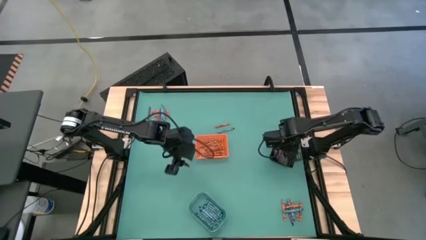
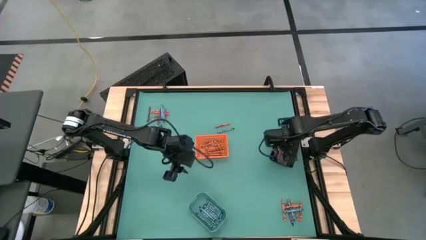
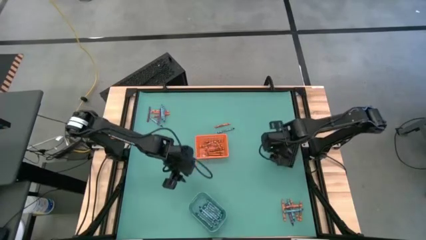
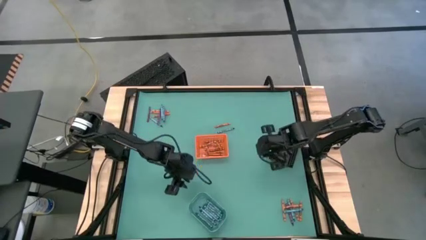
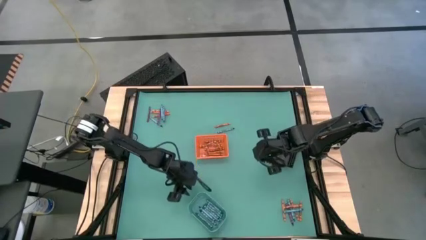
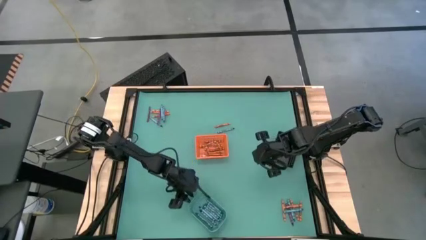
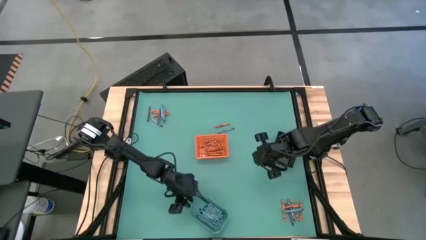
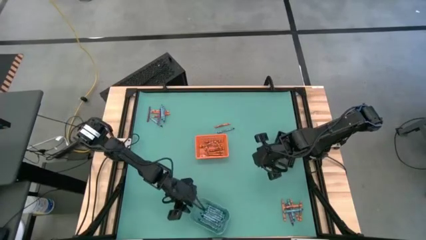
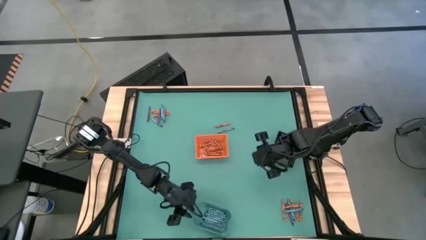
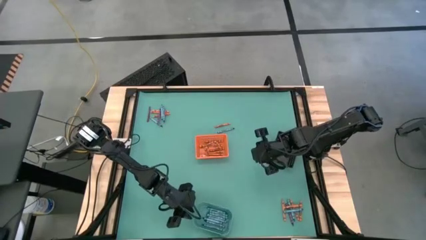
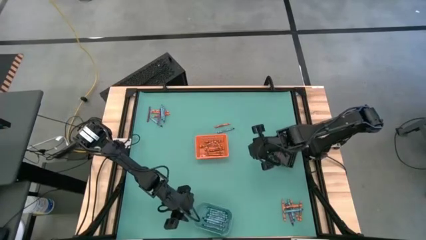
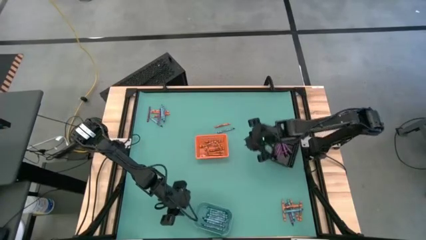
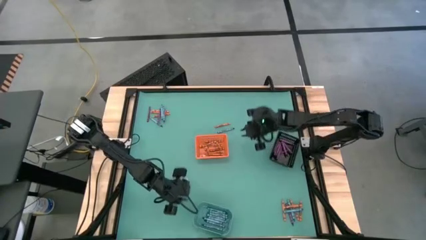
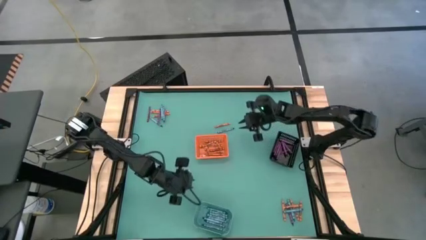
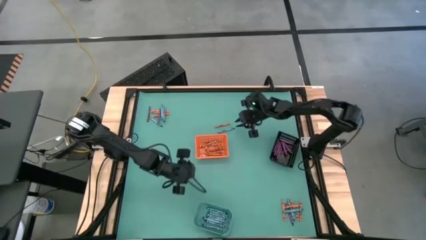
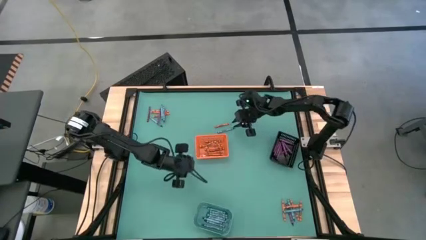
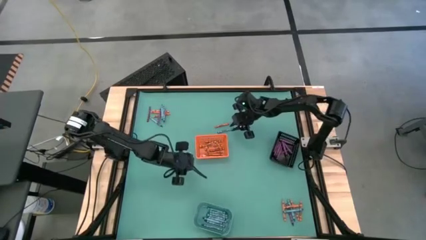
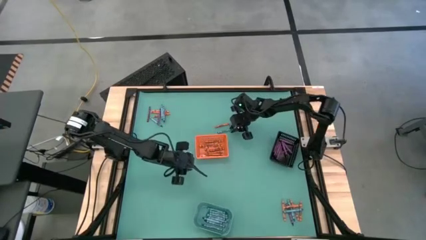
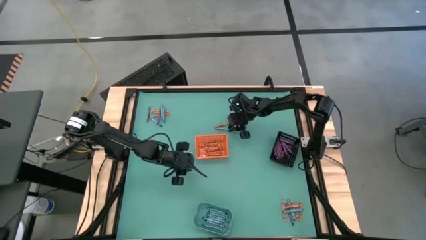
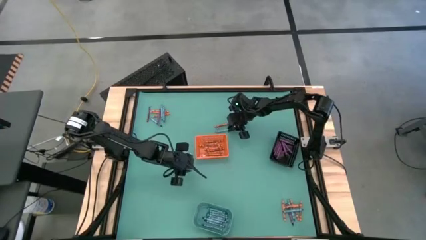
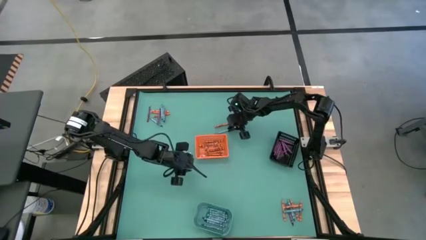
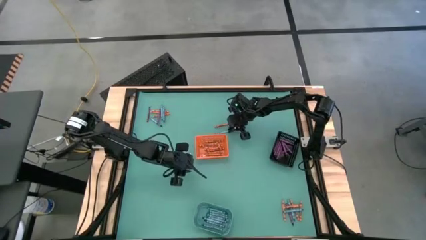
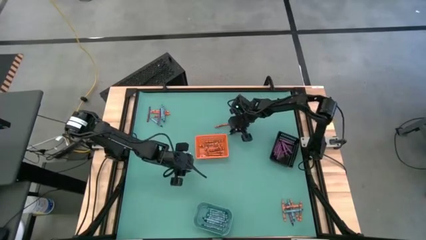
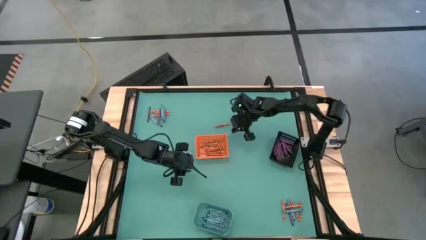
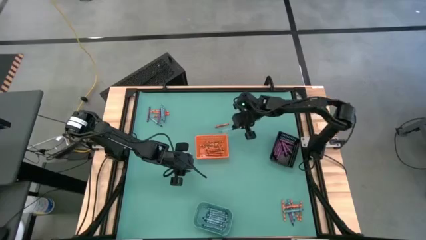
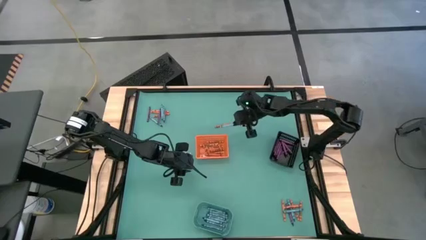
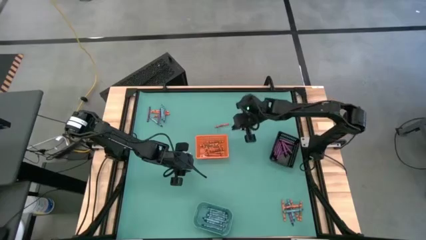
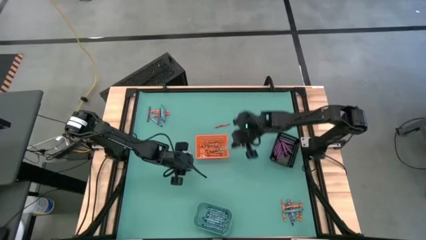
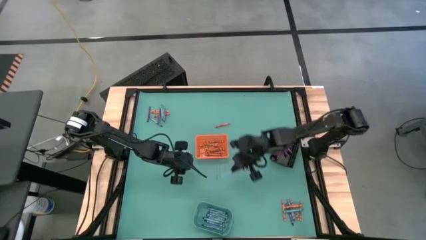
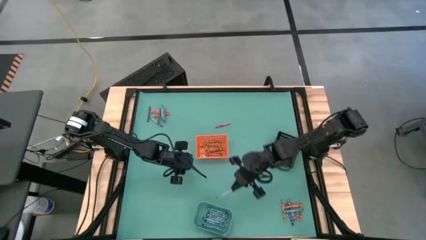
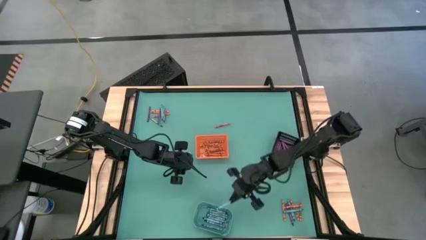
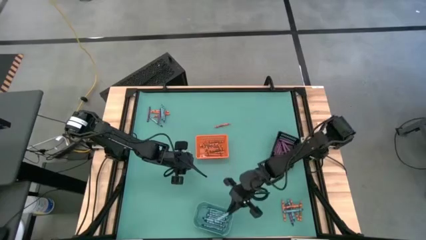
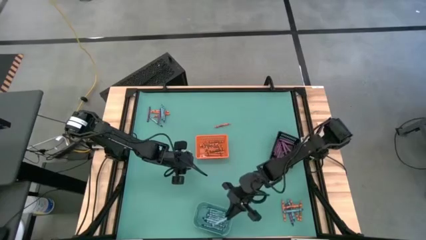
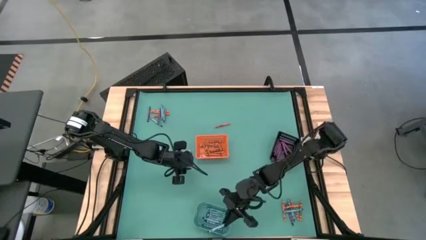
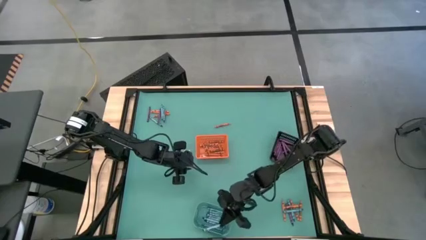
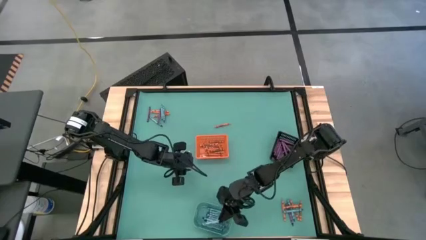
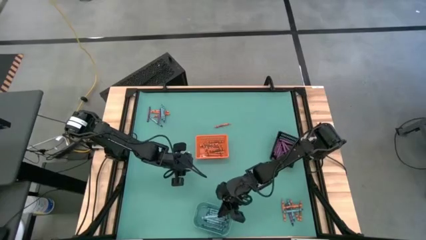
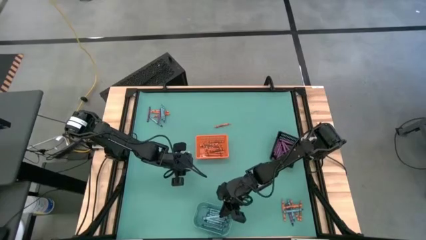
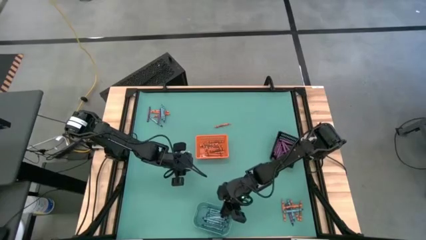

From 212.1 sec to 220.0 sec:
Task: Sort crayons
Put the blue crayon into the blue bin

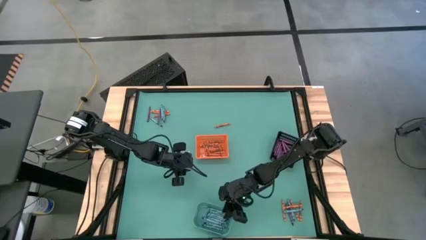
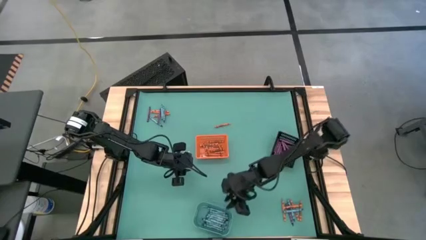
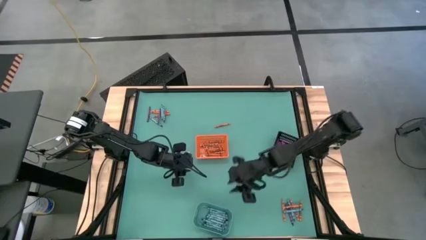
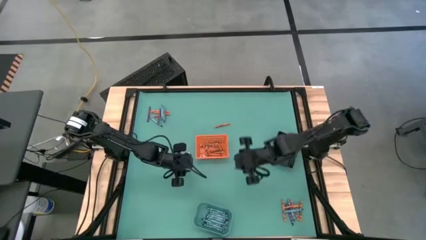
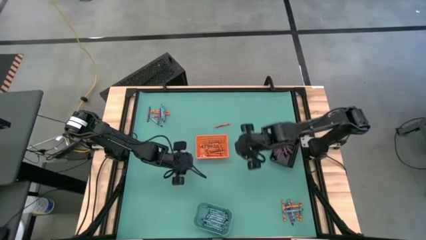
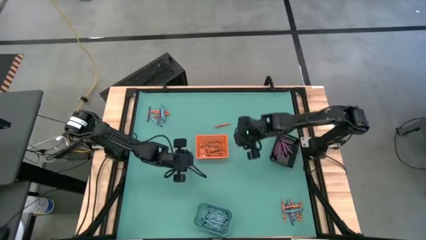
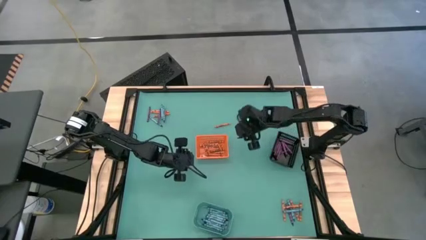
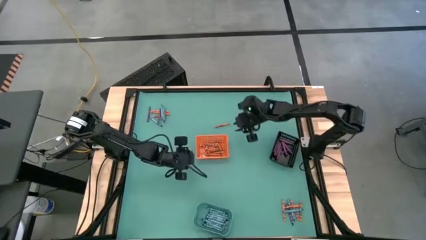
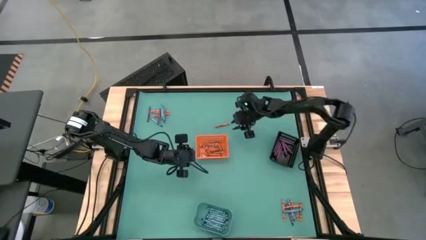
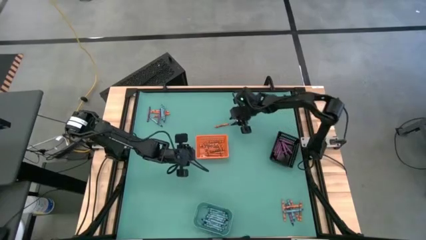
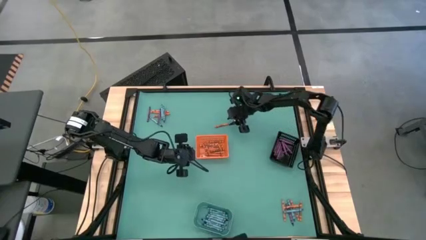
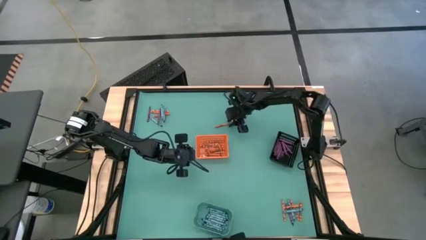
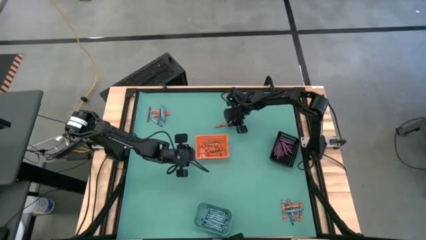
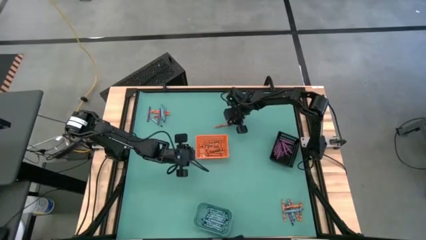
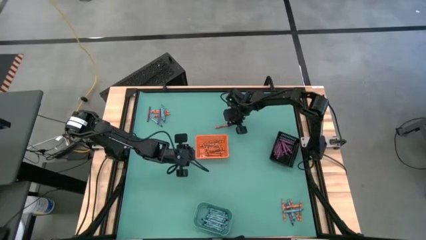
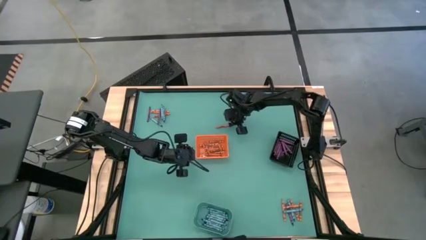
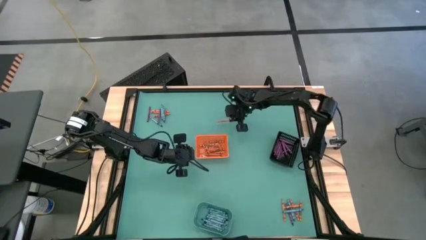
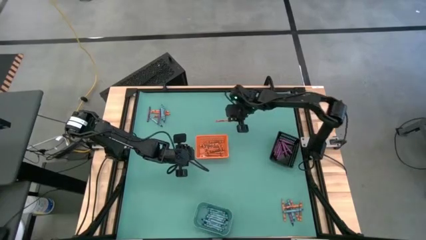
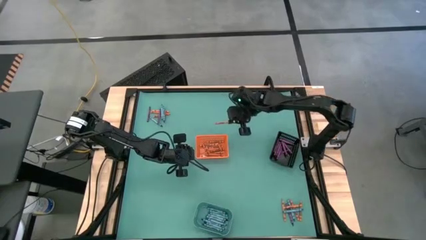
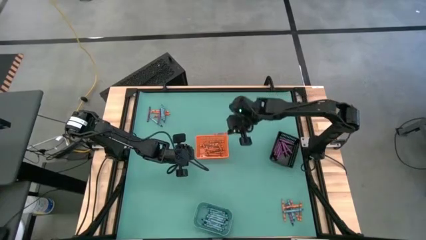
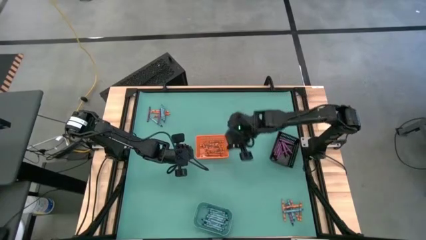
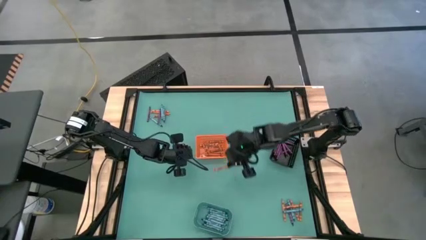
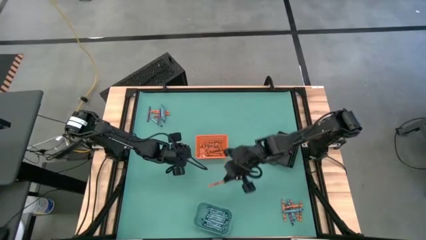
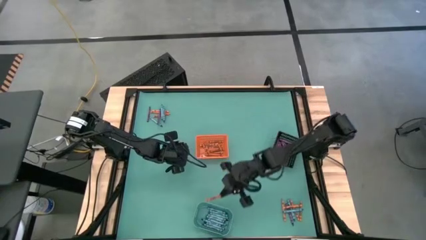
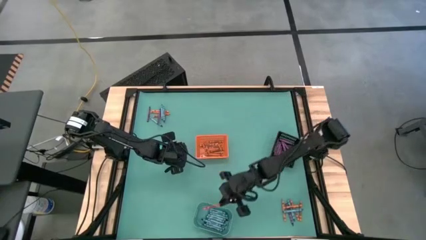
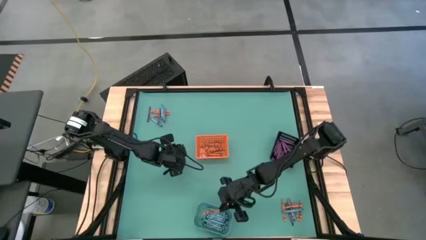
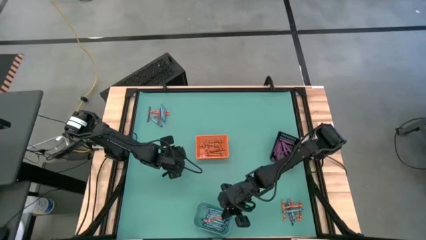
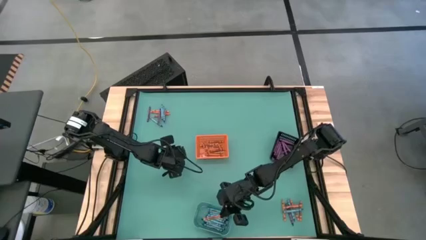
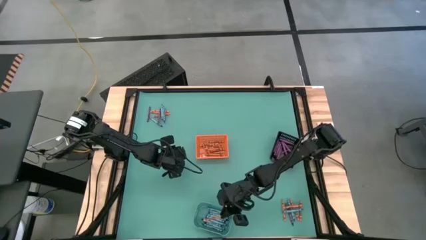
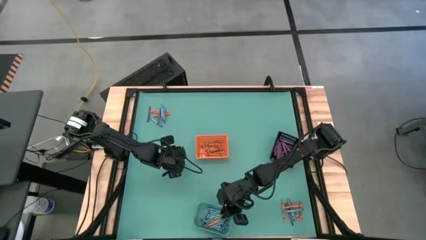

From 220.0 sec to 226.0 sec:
Put the orange crayon into the orange bin
